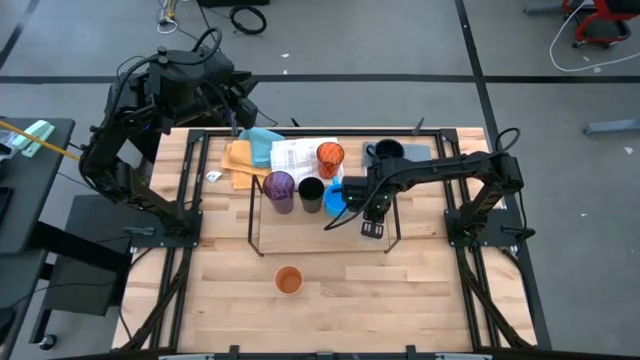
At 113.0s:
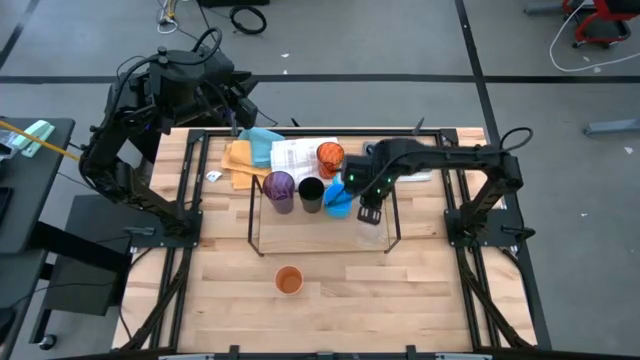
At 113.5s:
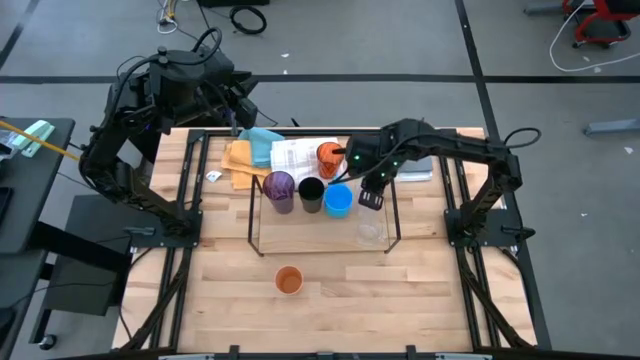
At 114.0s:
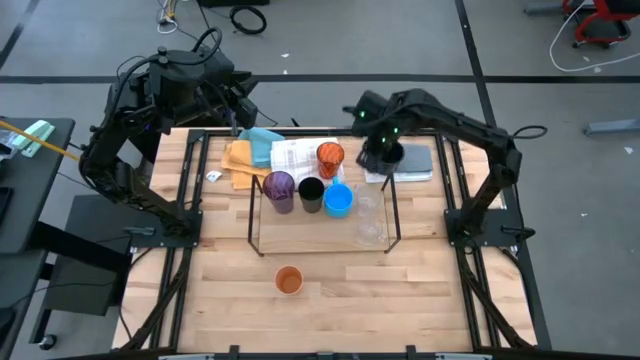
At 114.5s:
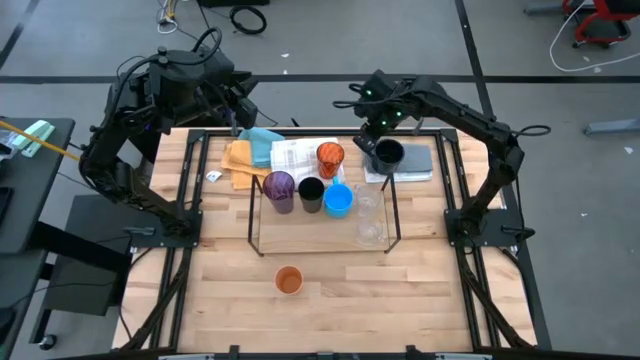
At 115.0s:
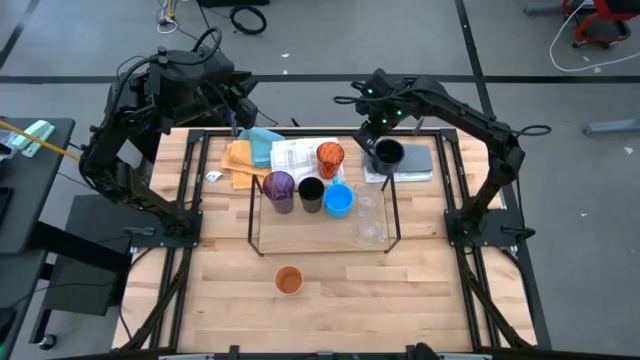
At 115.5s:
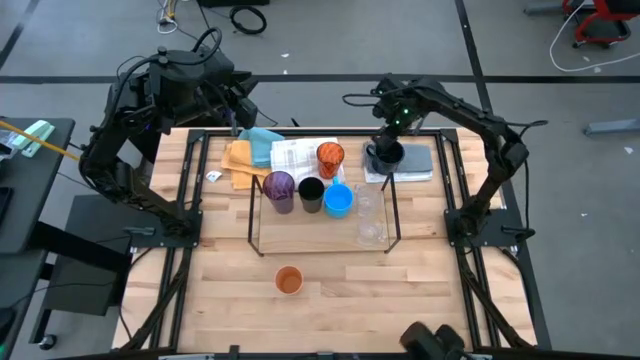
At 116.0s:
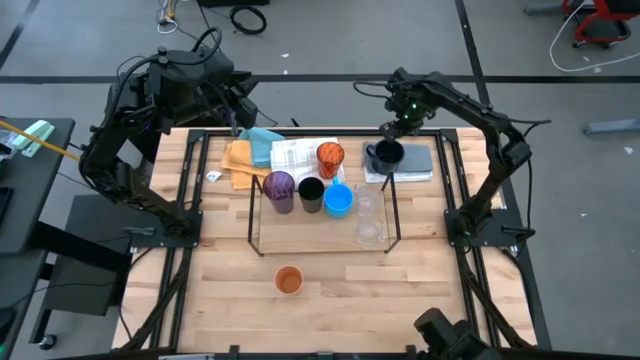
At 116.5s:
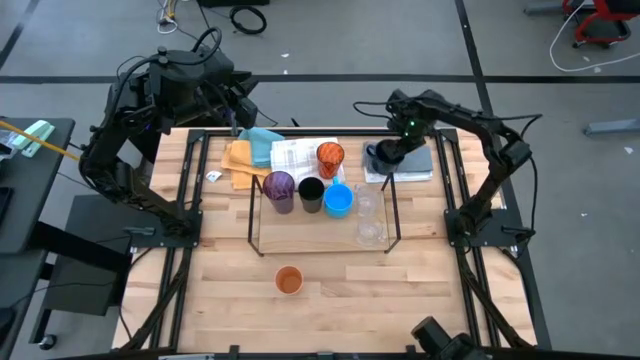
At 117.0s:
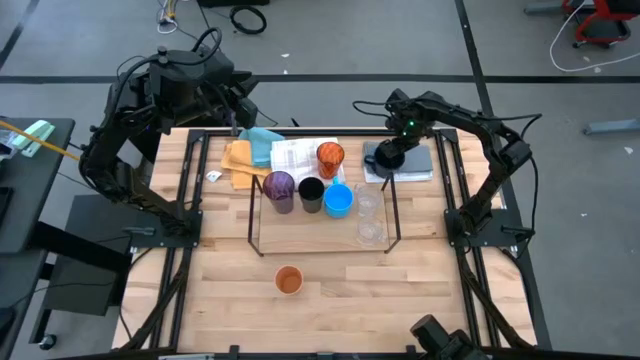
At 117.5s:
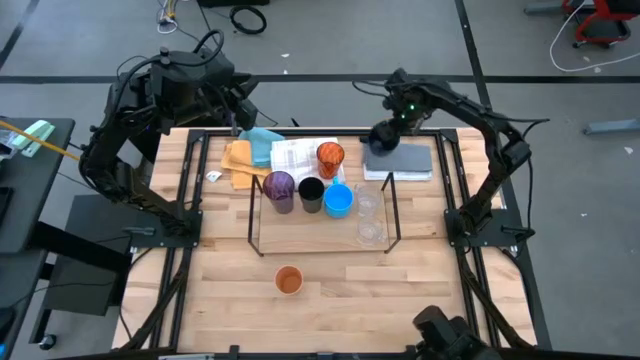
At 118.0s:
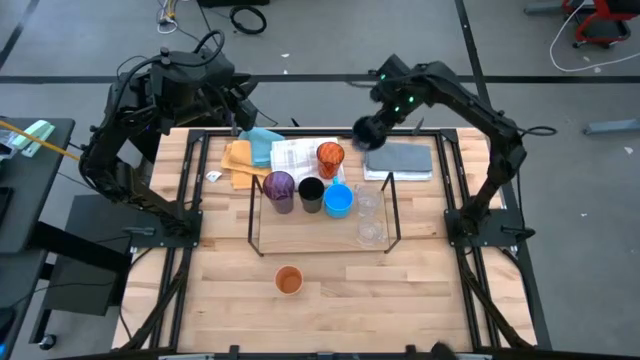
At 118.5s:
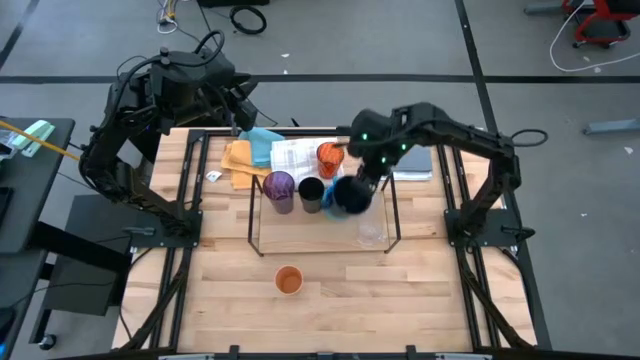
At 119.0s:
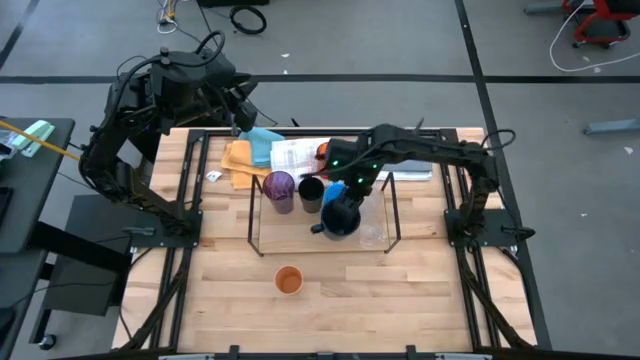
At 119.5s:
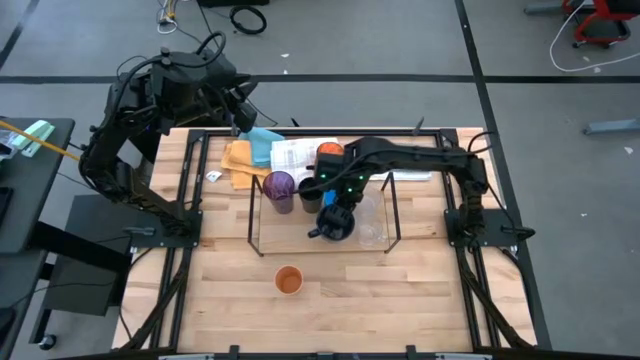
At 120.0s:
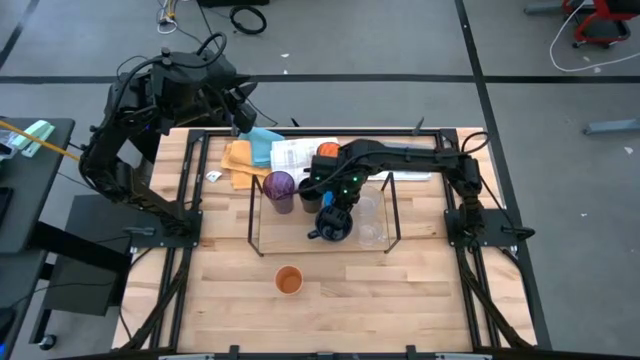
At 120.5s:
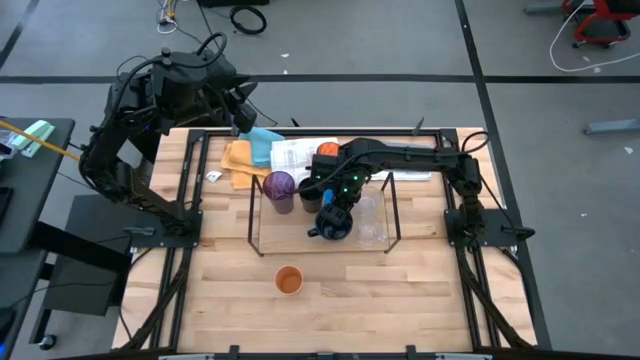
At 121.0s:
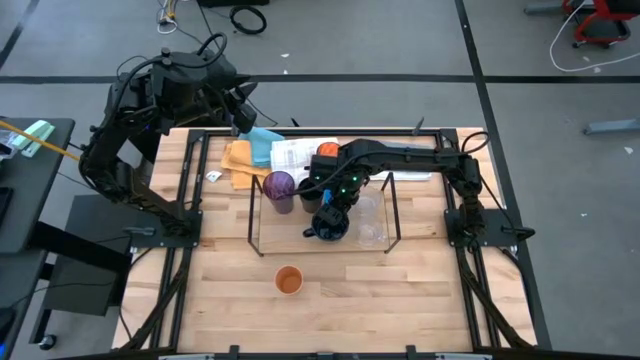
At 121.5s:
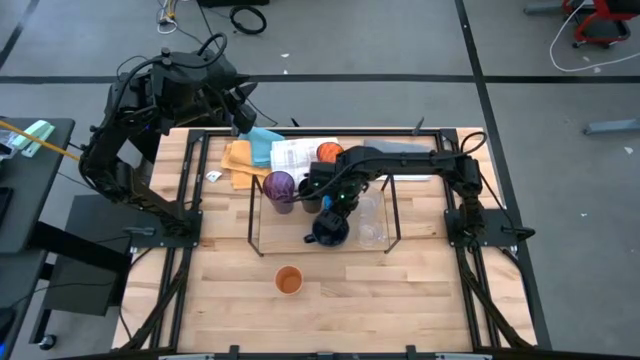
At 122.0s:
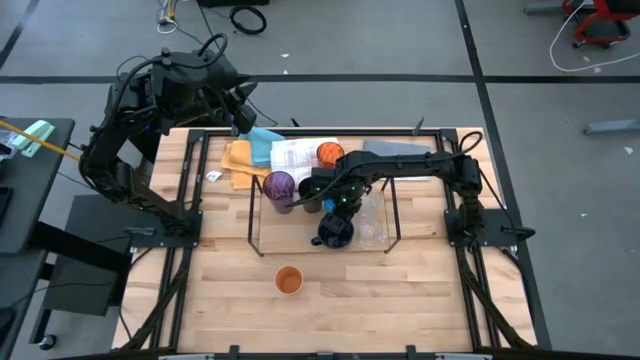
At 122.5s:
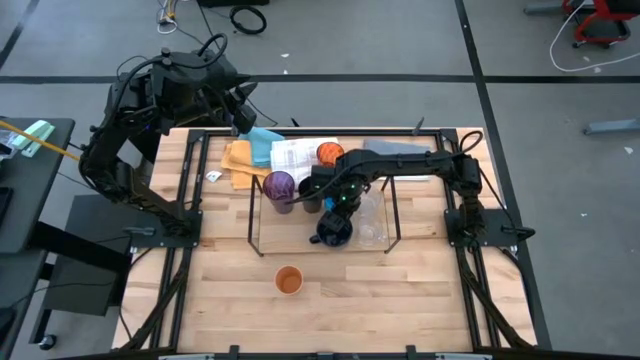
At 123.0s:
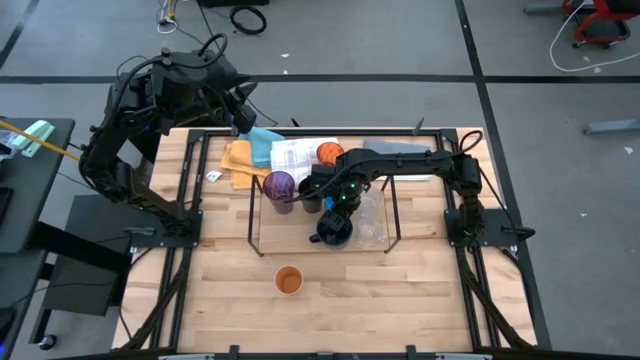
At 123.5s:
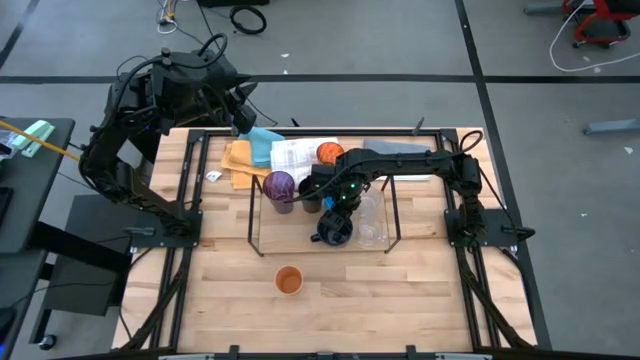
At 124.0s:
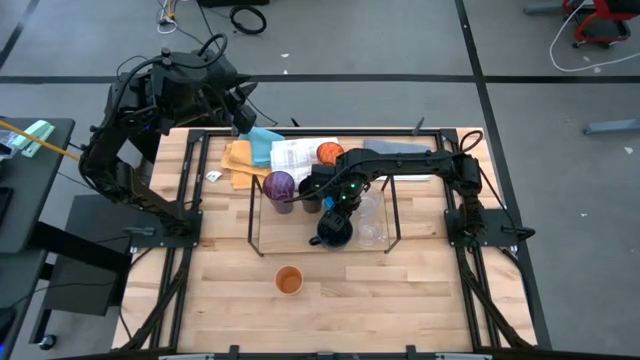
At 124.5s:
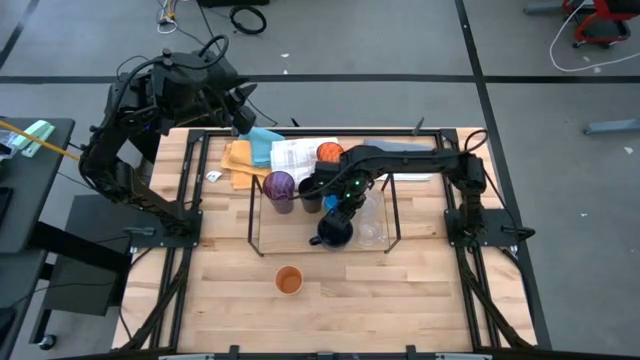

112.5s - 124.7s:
Task: Stack small to large cups/mugs on shelf
Put the dark blue mug on the shelf

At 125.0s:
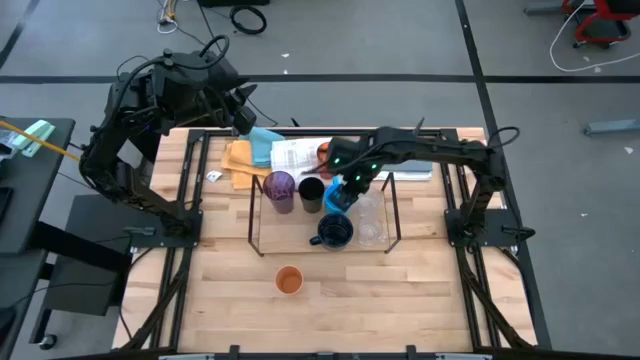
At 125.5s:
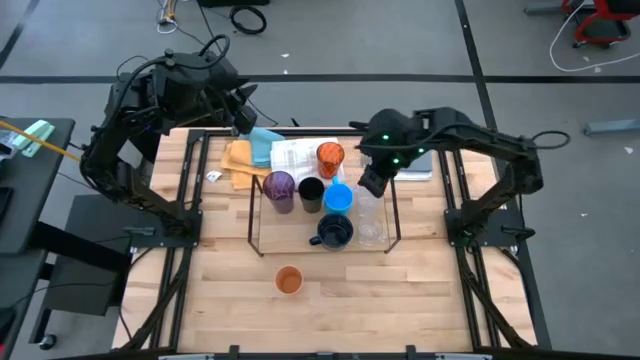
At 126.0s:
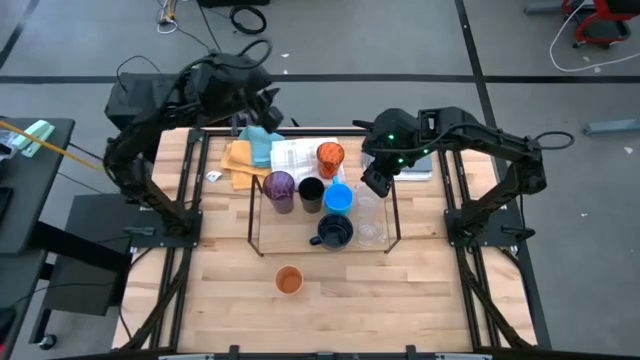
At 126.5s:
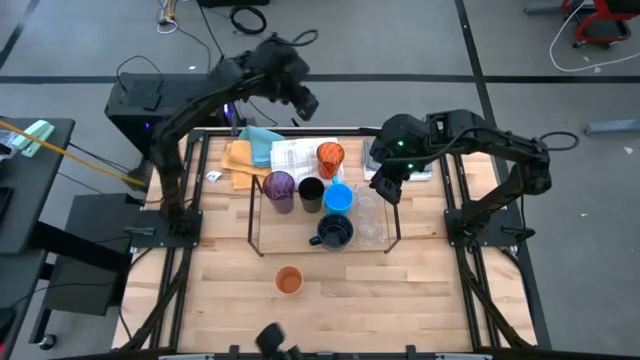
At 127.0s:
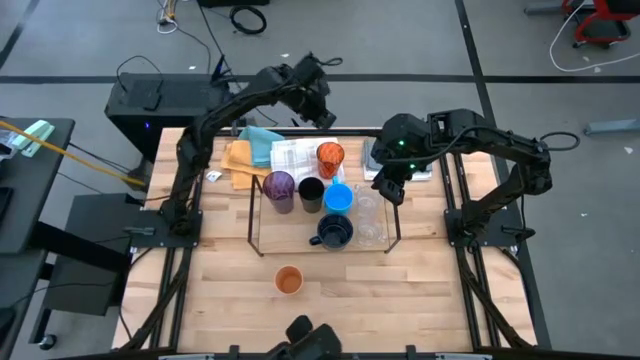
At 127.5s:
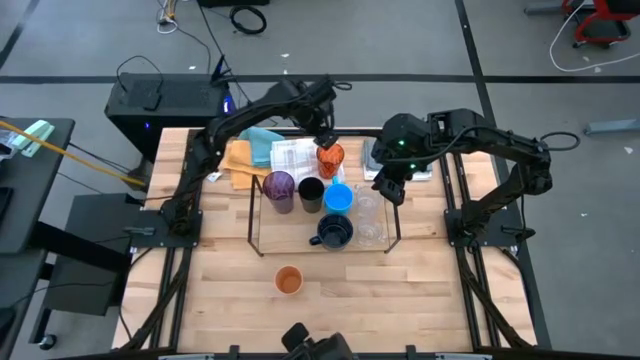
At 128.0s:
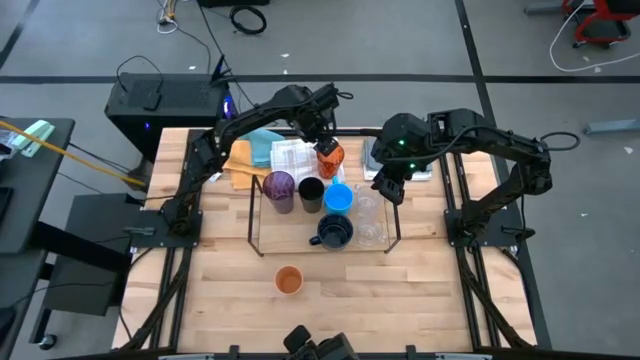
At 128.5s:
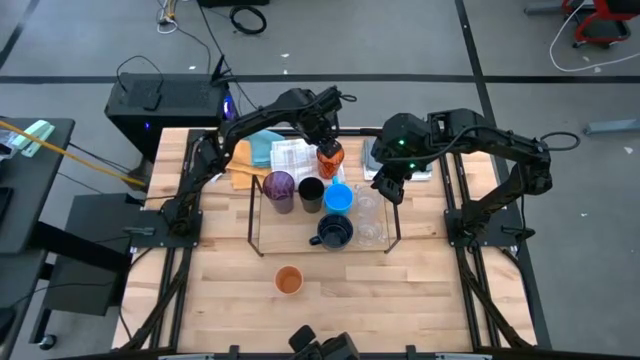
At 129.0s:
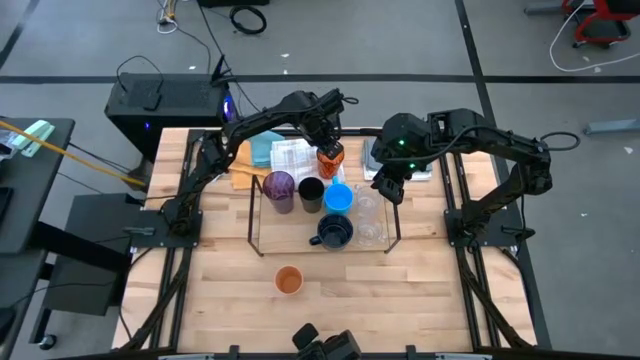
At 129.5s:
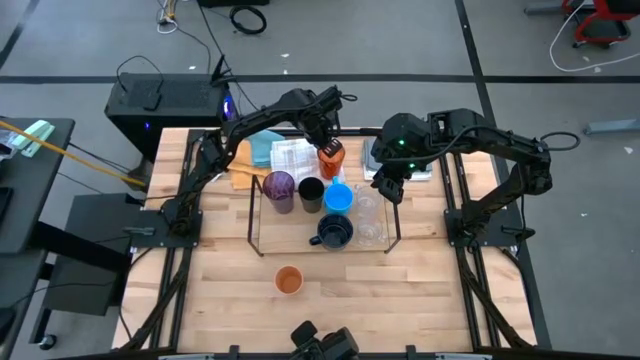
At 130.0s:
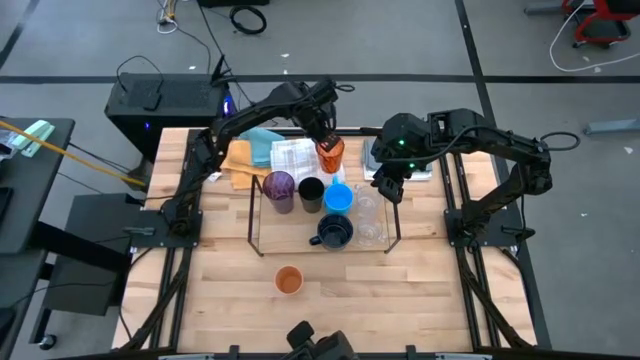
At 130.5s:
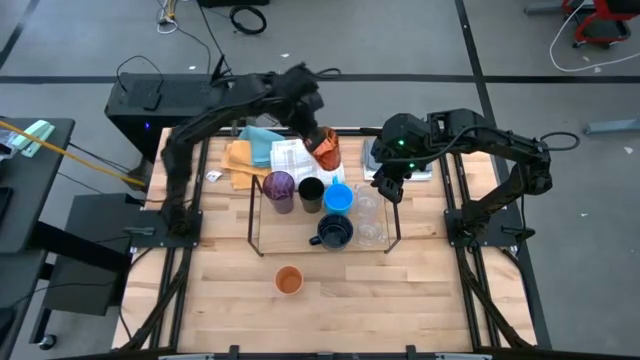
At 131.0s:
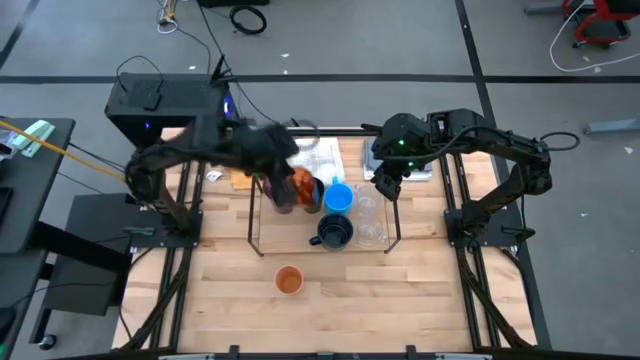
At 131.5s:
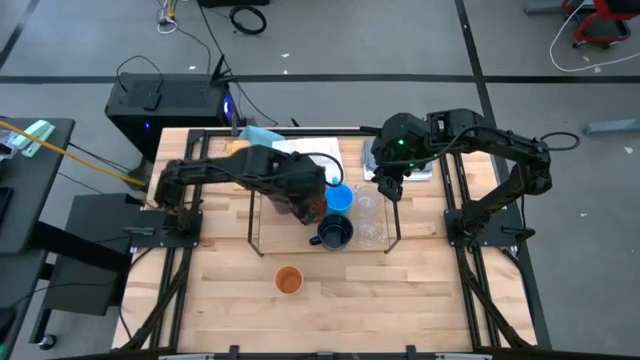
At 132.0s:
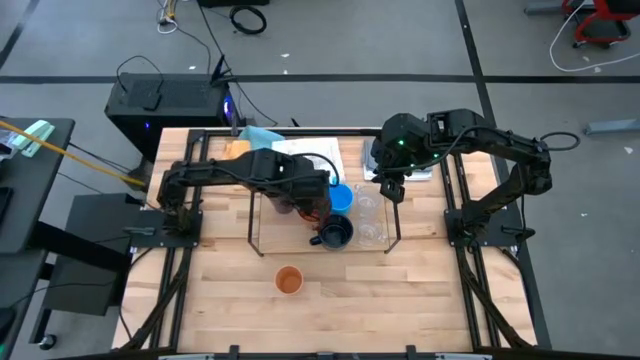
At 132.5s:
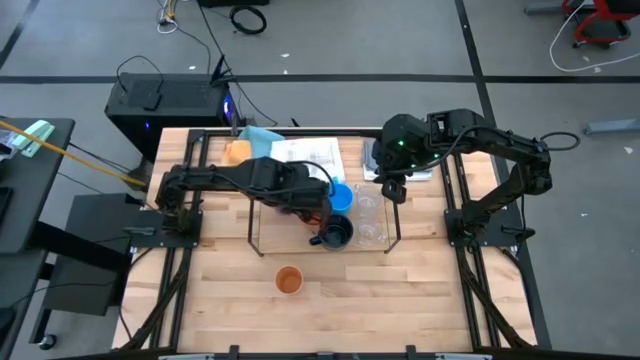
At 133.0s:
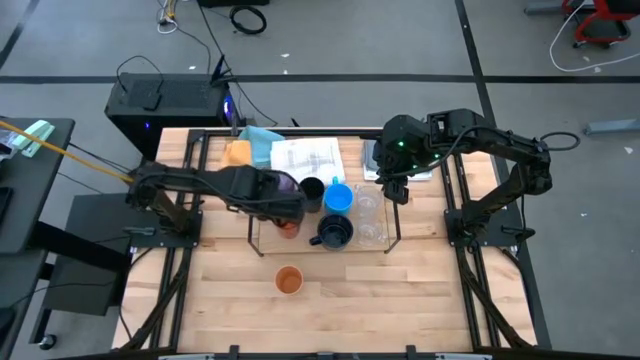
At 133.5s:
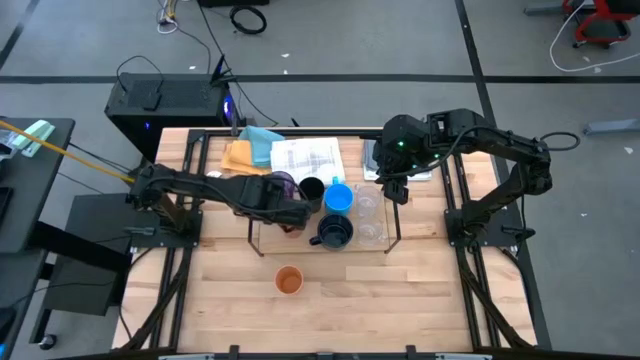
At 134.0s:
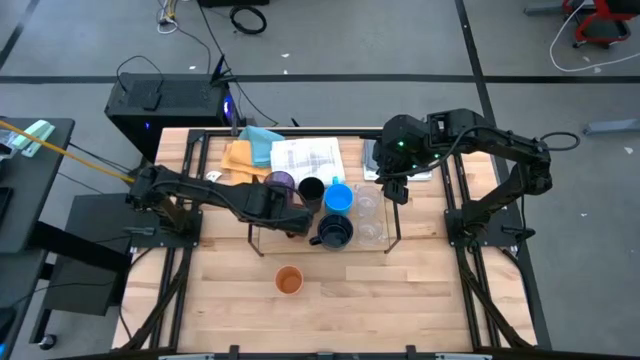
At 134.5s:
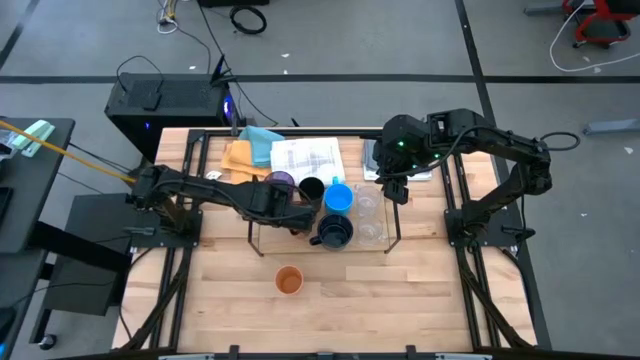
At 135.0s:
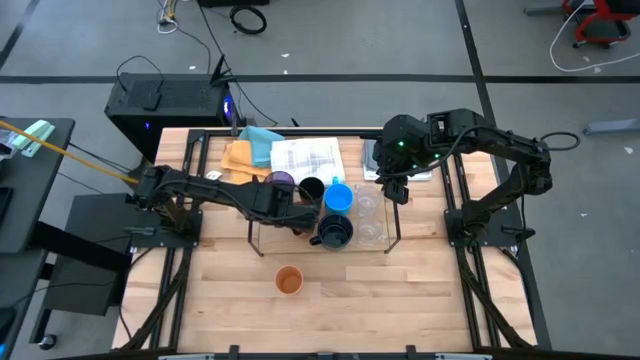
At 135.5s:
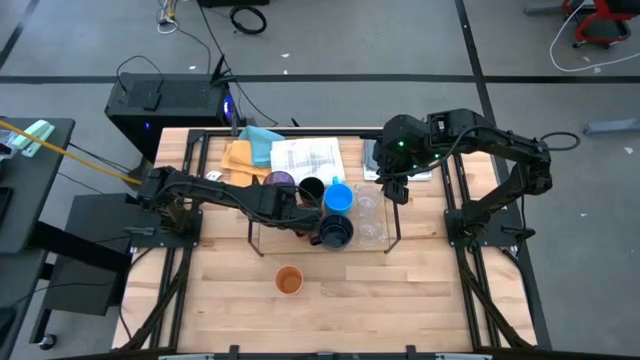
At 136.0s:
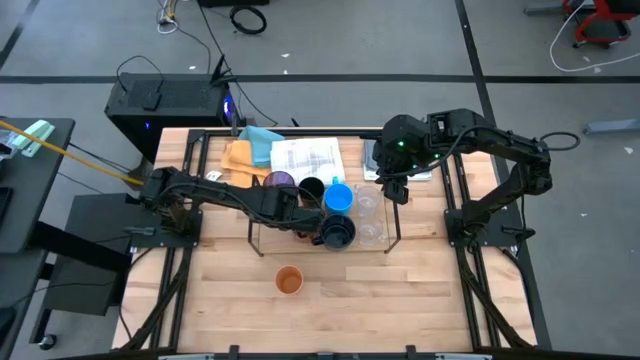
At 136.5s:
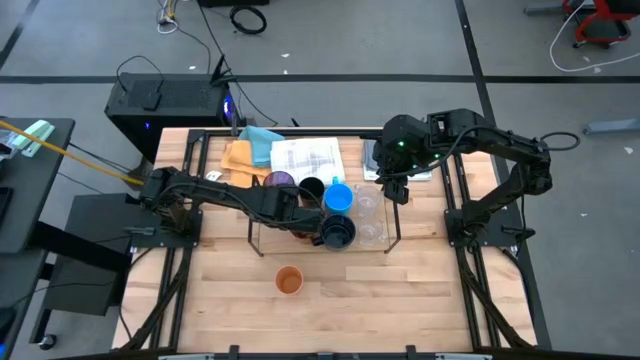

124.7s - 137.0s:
Put the orange glass on the shelf
